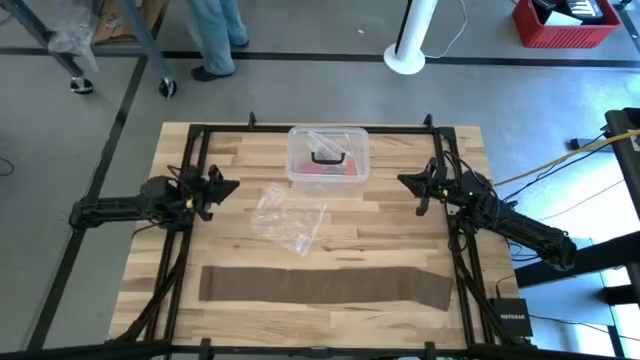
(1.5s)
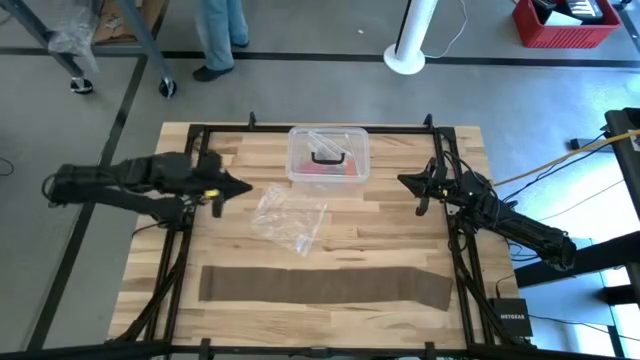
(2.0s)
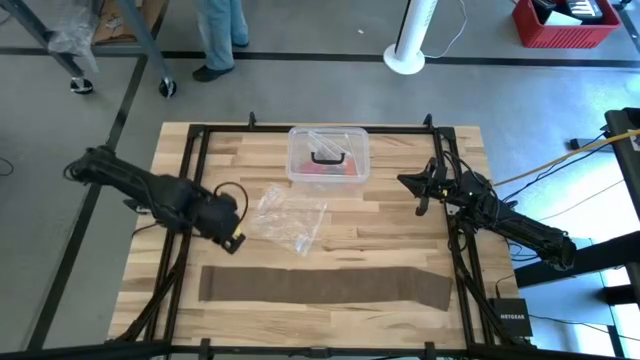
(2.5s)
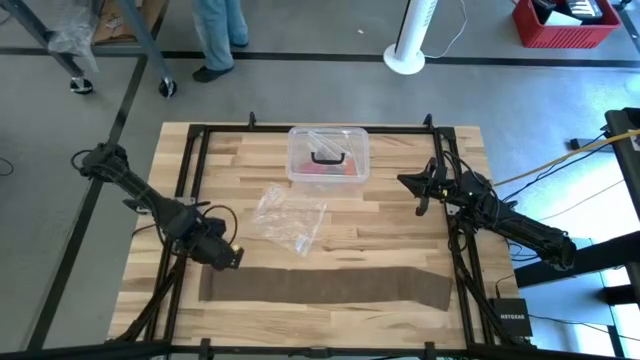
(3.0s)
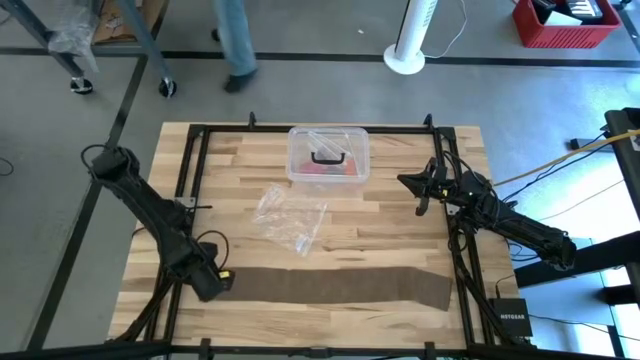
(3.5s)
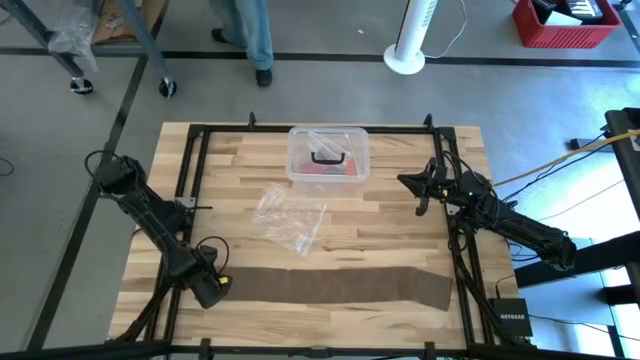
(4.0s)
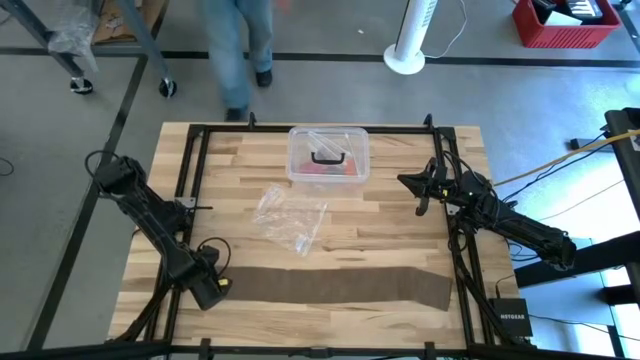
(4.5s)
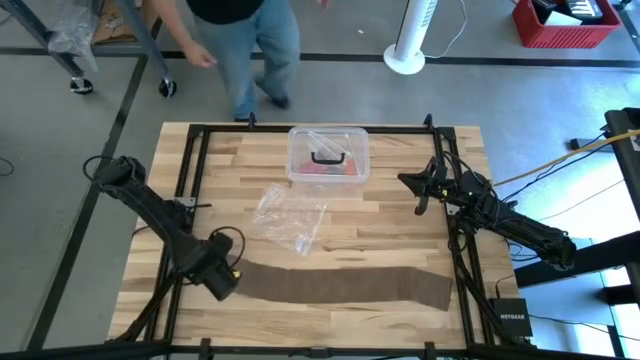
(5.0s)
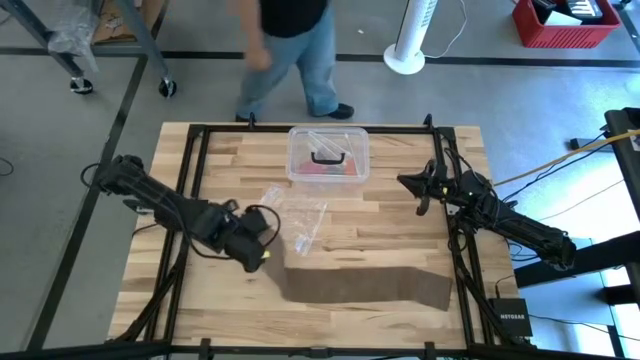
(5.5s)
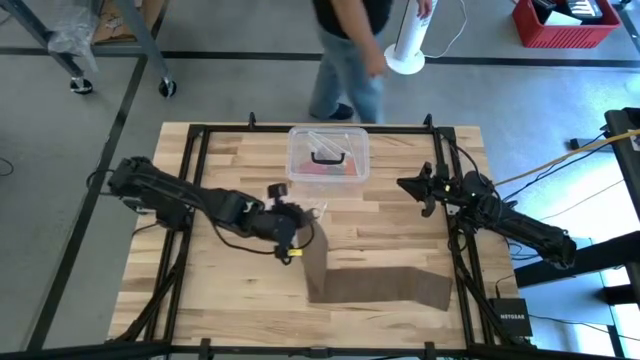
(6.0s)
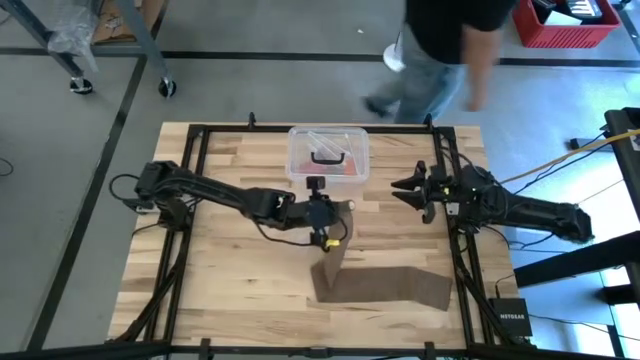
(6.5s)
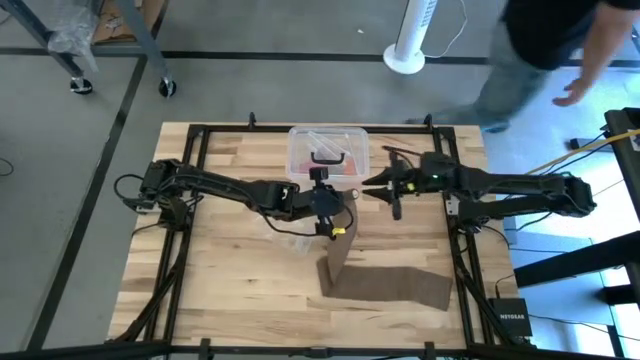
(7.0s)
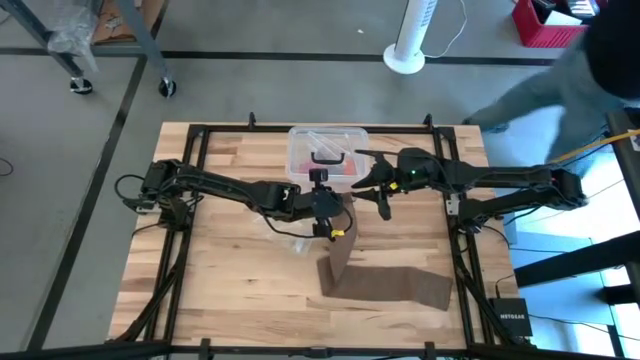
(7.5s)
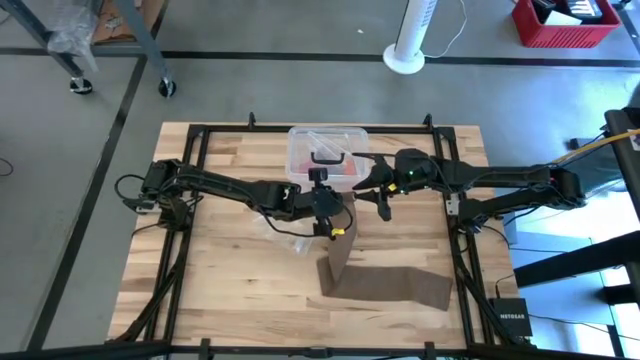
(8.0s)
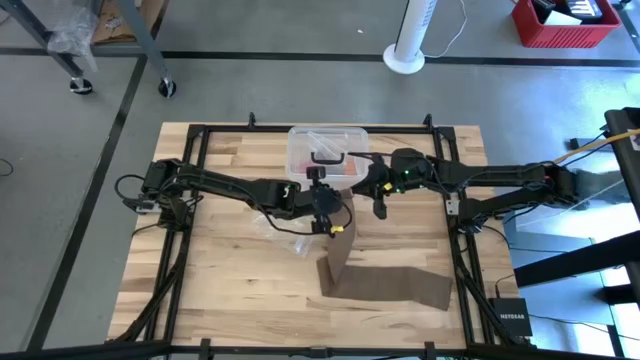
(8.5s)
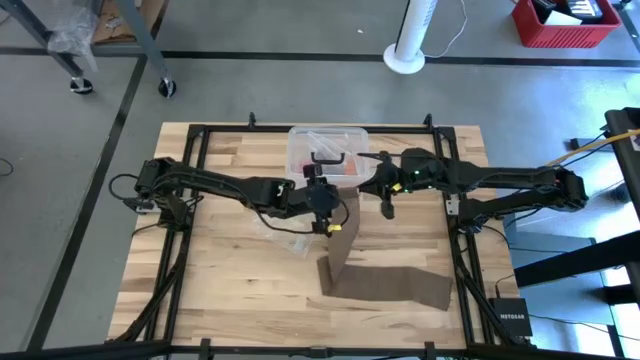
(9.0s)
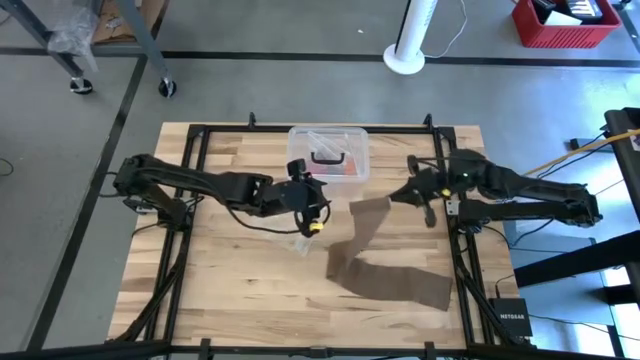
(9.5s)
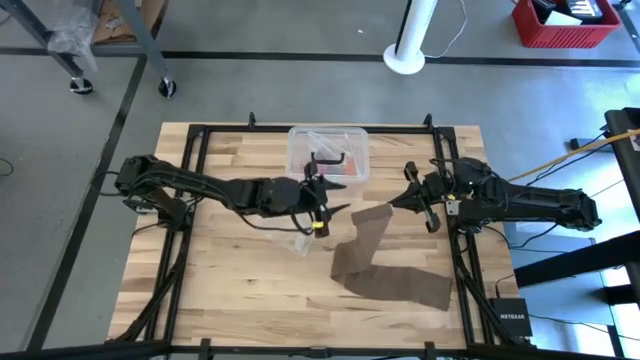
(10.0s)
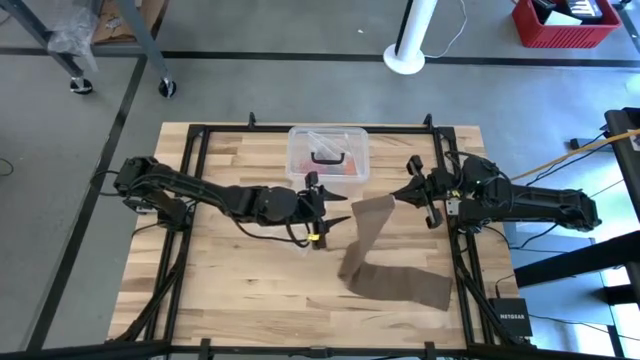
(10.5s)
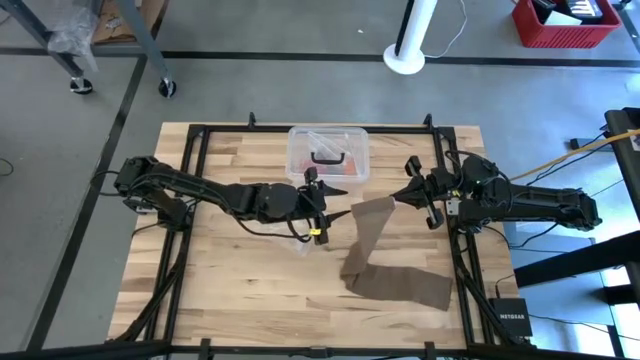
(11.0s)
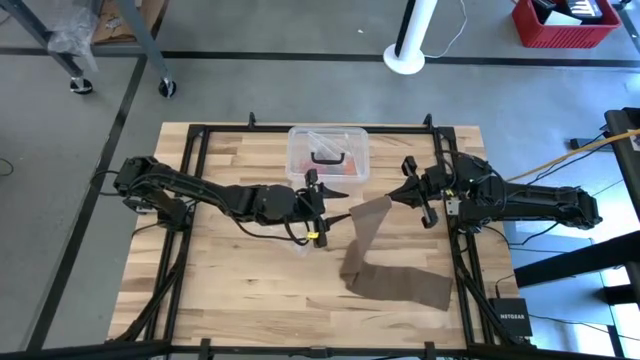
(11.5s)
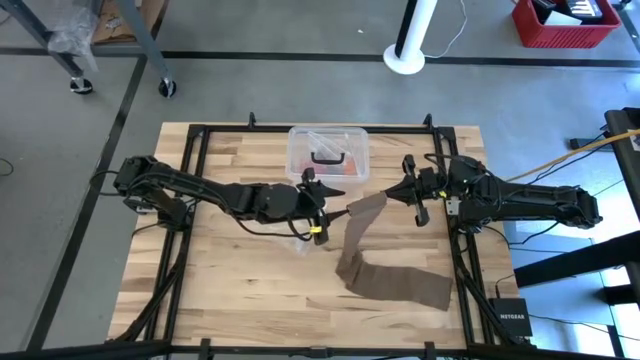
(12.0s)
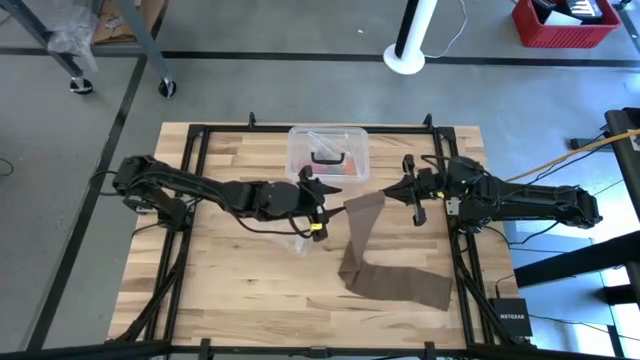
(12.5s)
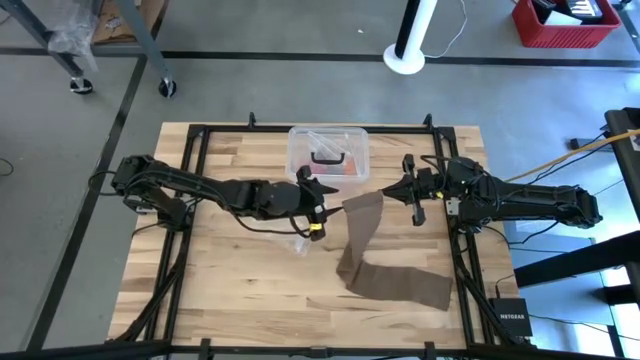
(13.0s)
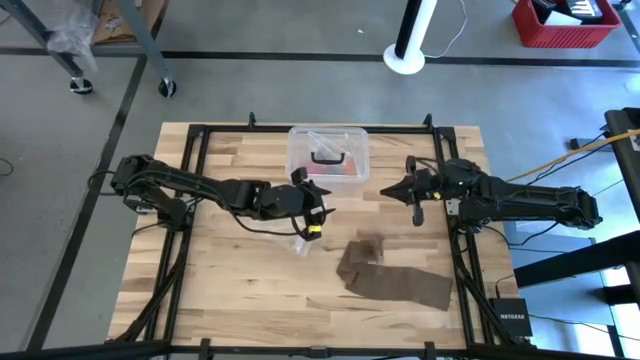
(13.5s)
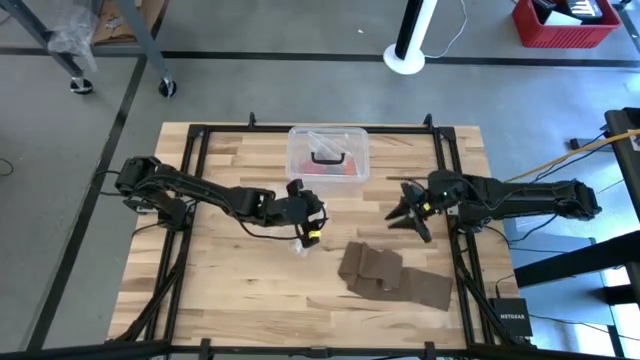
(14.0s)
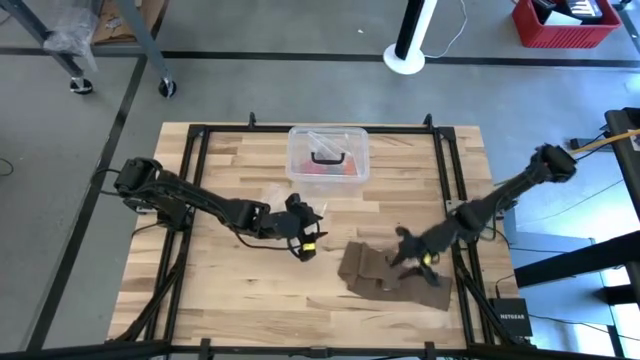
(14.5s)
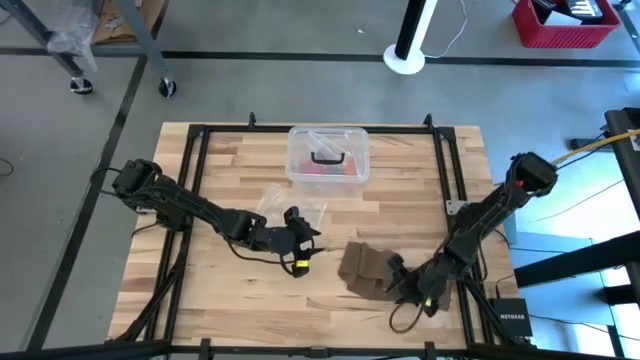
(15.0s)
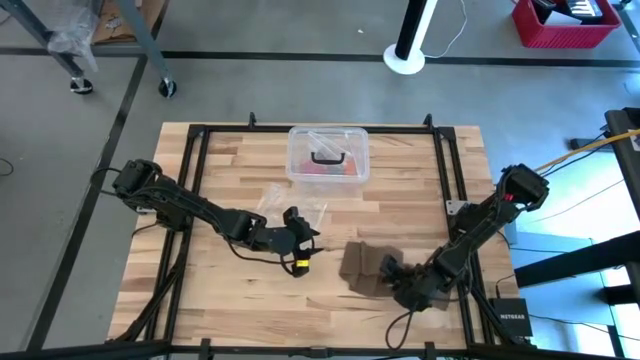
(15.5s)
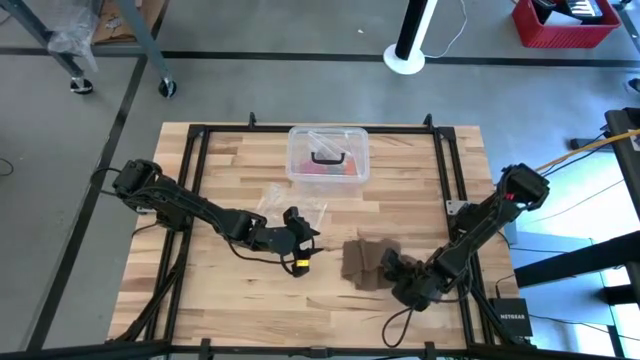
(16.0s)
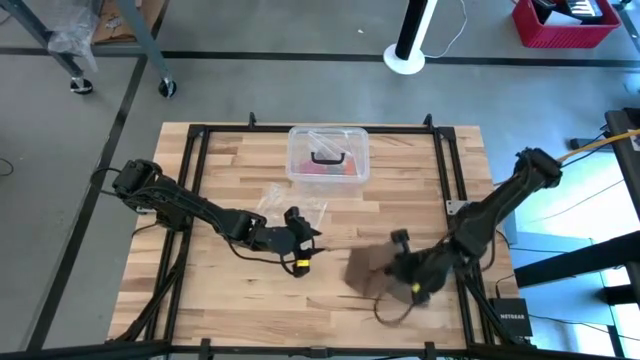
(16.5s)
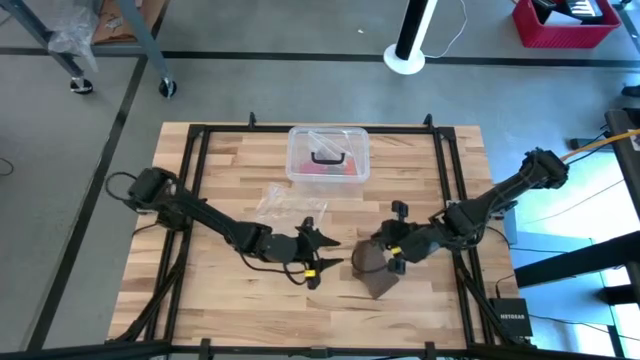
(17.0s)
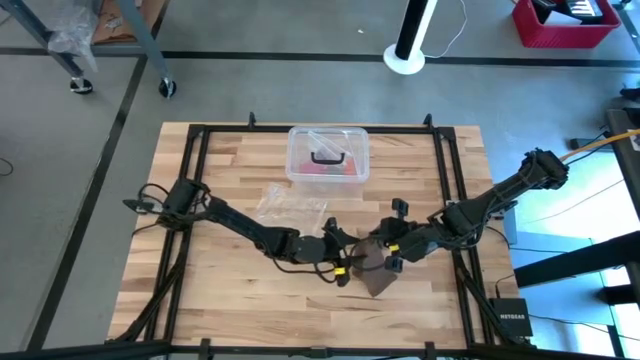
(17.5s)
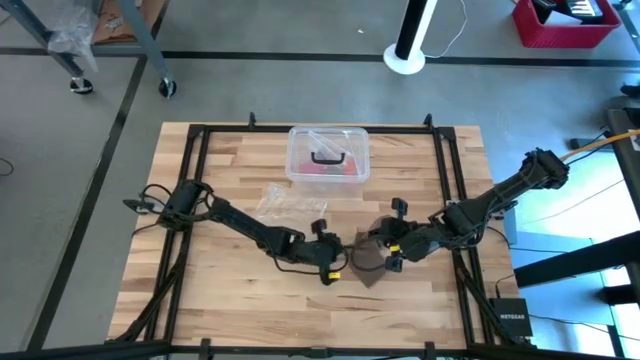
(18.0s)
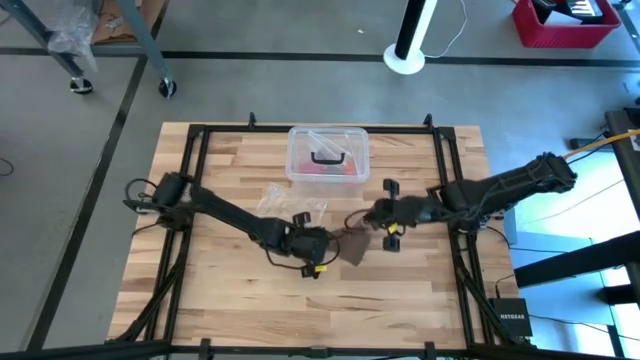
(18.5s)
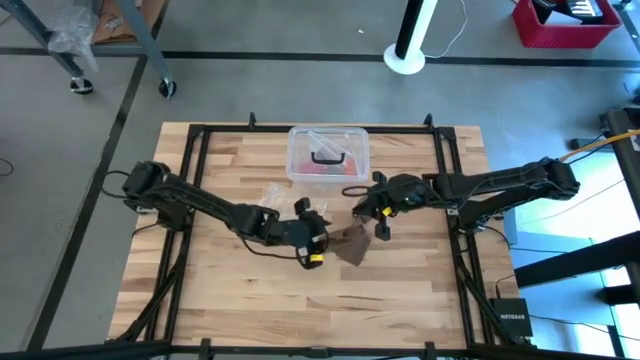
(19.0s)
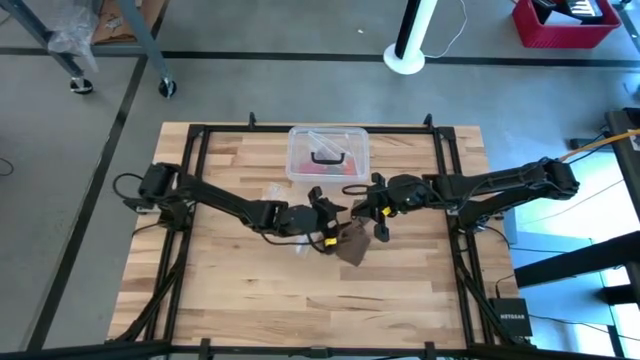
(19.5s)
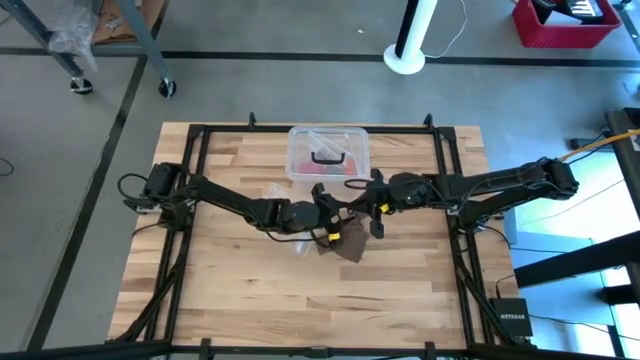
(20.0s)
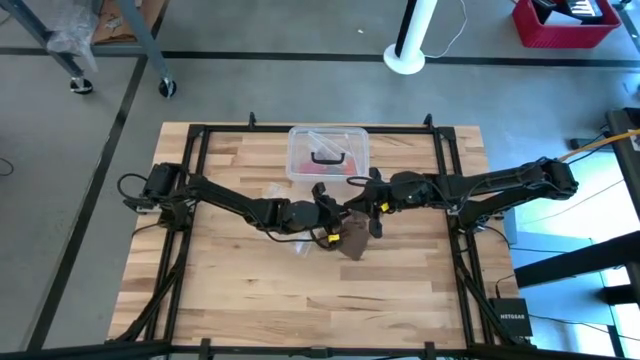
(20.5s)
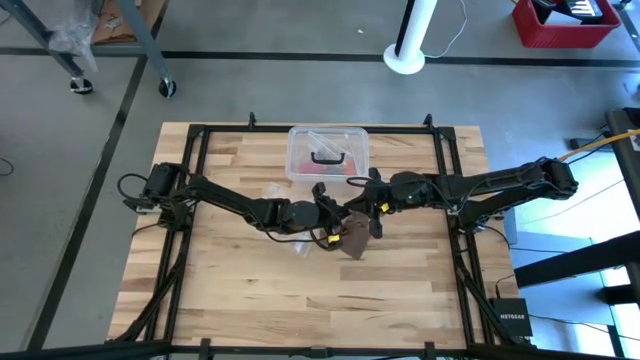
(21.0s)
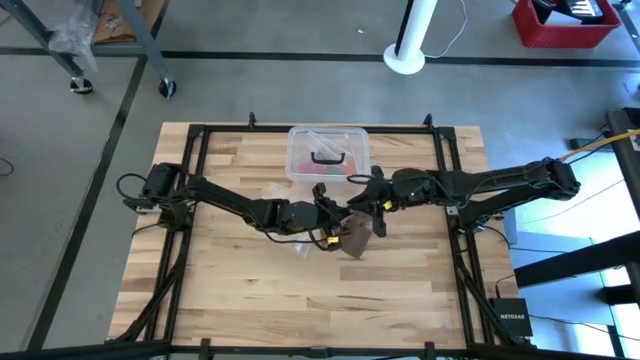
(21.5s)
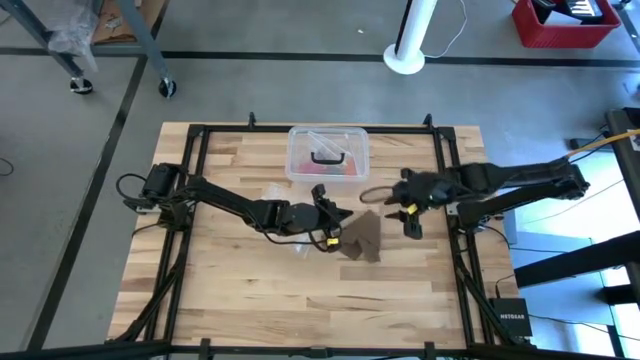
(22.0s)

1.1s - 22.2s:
Task: Roll bandage
Roll the brown bandage
